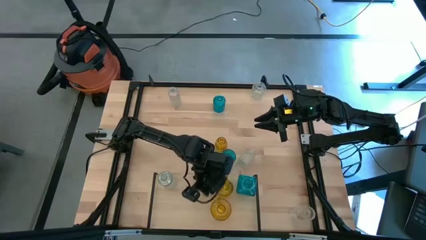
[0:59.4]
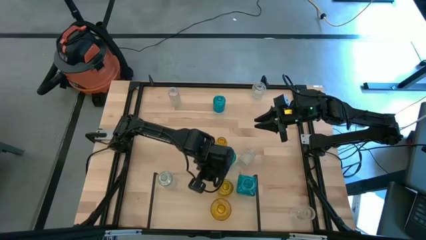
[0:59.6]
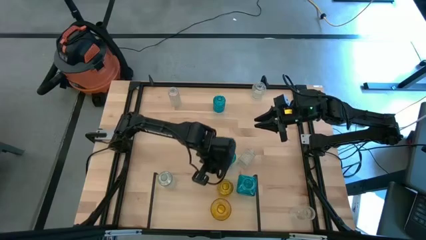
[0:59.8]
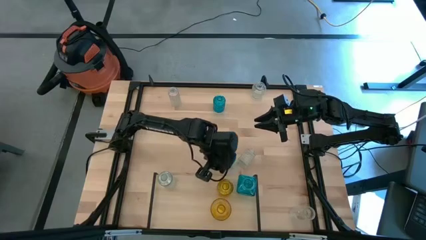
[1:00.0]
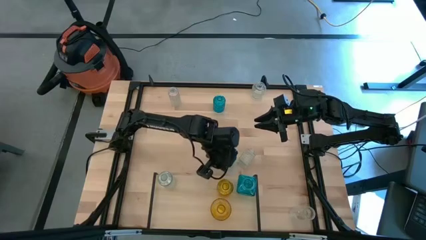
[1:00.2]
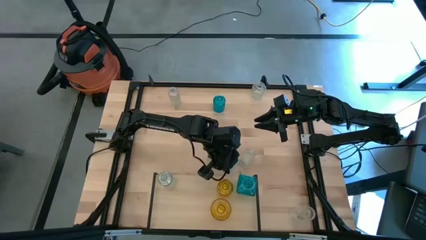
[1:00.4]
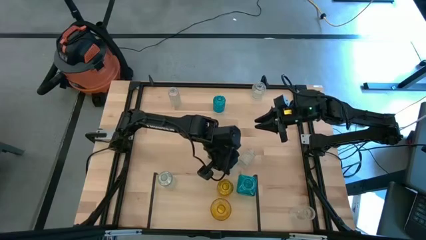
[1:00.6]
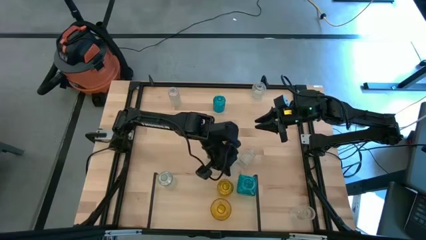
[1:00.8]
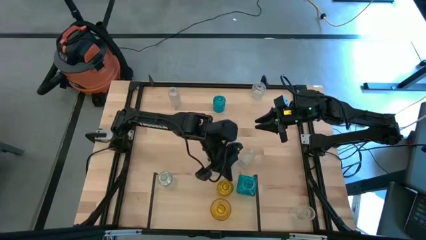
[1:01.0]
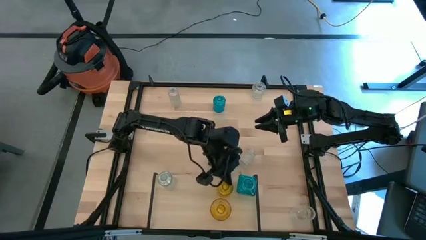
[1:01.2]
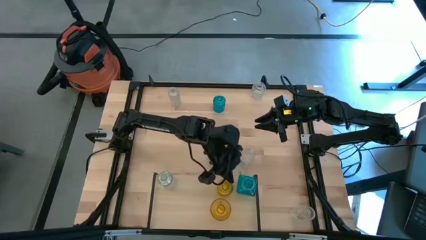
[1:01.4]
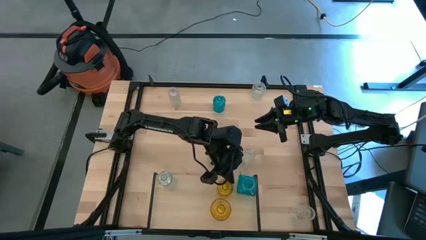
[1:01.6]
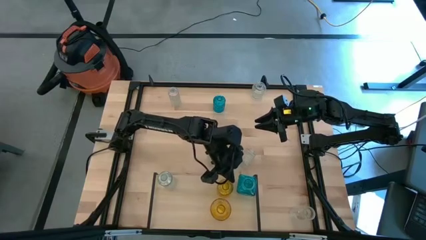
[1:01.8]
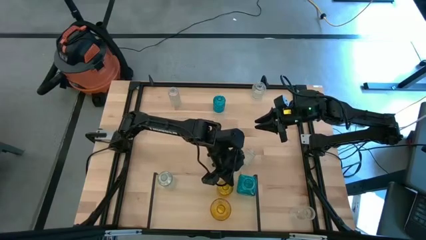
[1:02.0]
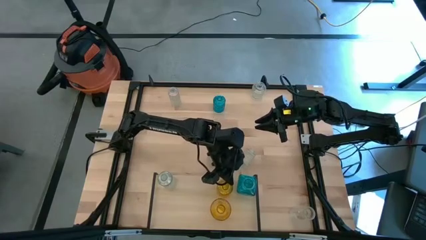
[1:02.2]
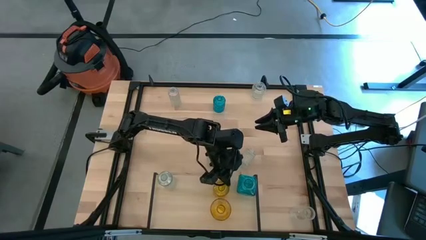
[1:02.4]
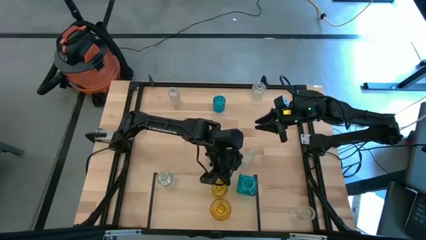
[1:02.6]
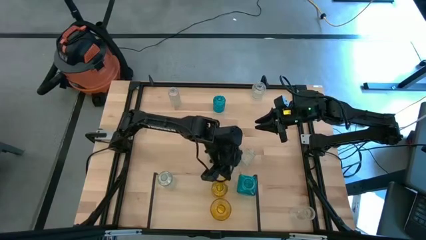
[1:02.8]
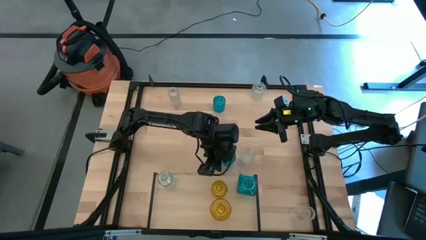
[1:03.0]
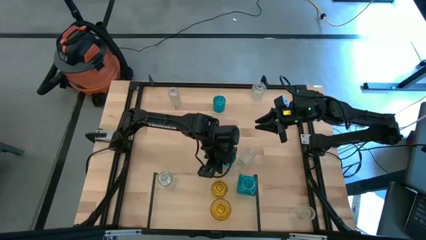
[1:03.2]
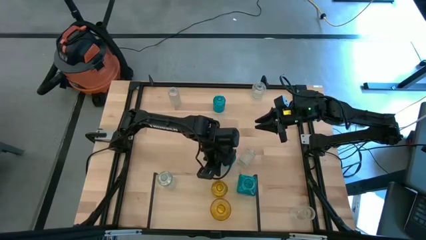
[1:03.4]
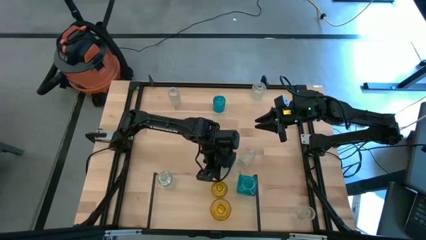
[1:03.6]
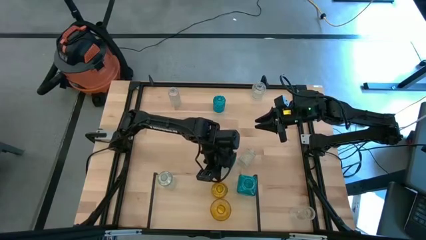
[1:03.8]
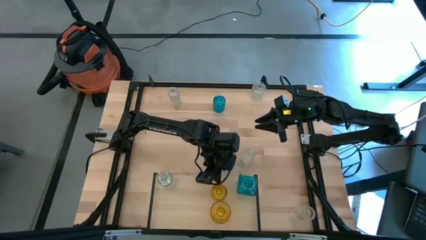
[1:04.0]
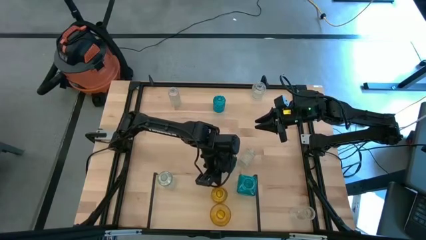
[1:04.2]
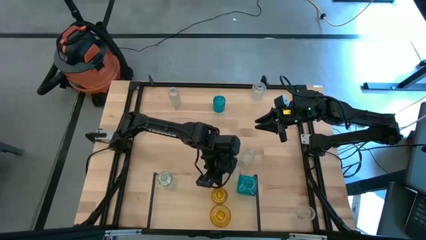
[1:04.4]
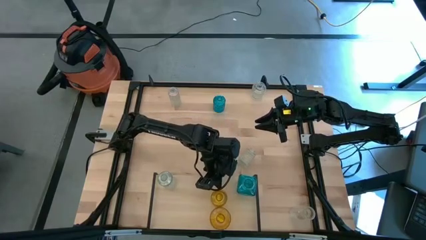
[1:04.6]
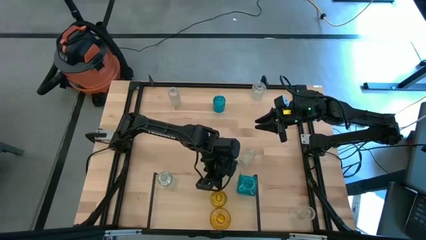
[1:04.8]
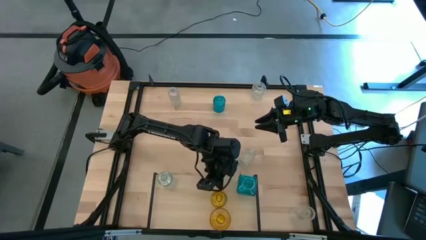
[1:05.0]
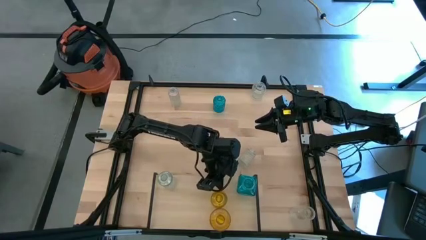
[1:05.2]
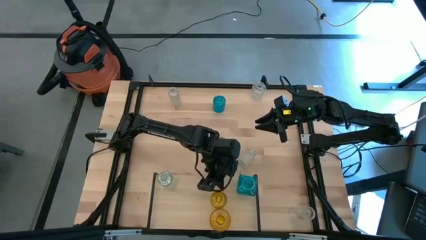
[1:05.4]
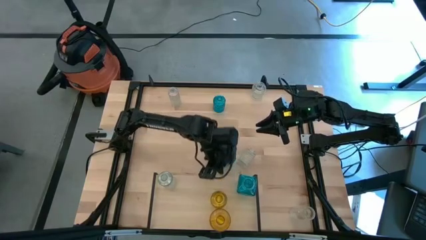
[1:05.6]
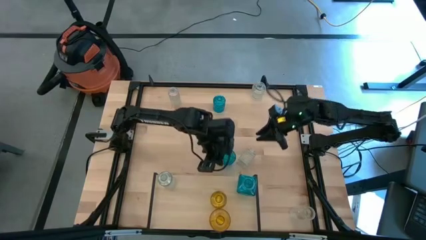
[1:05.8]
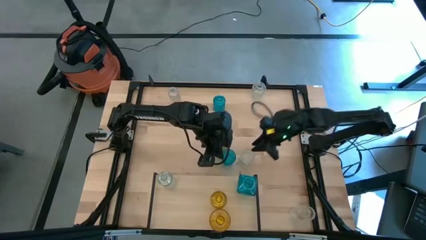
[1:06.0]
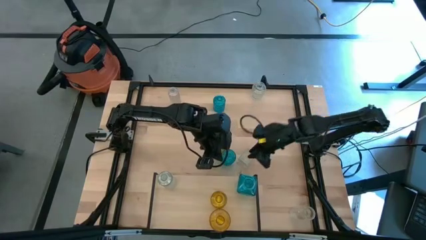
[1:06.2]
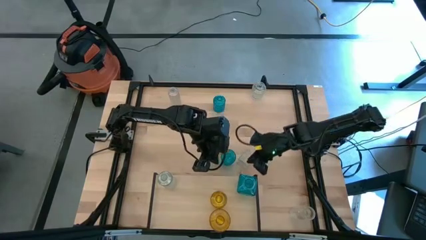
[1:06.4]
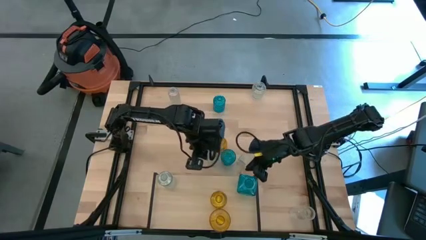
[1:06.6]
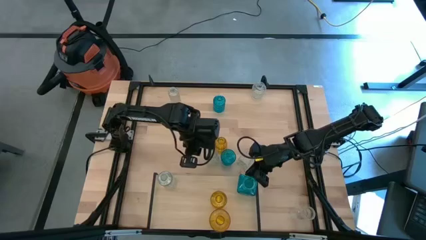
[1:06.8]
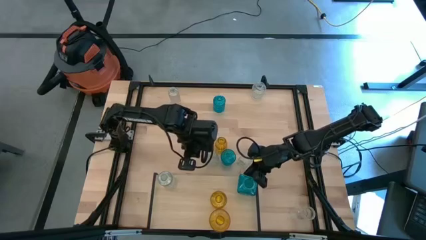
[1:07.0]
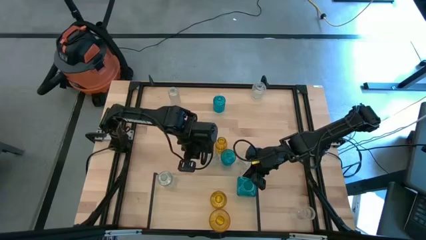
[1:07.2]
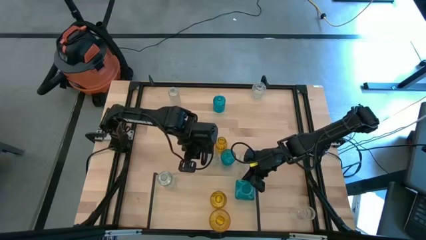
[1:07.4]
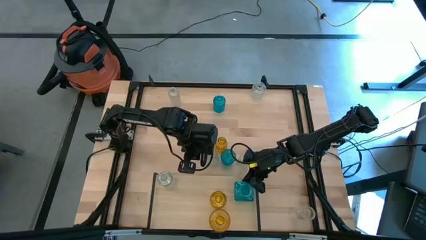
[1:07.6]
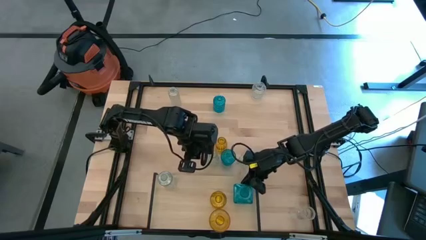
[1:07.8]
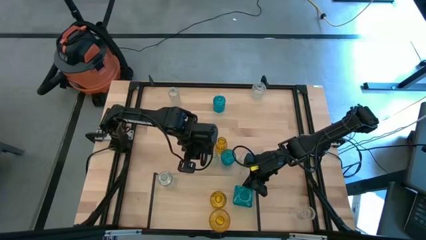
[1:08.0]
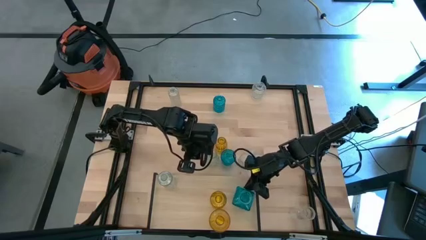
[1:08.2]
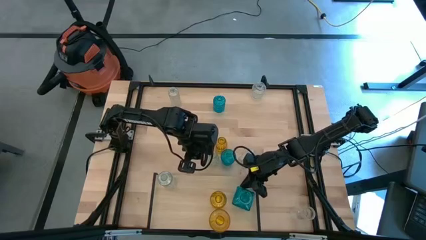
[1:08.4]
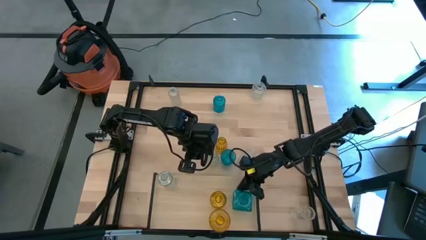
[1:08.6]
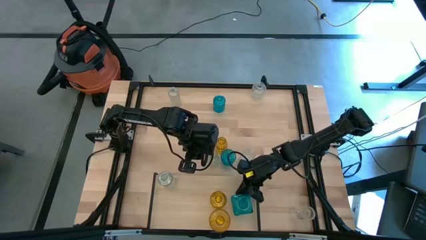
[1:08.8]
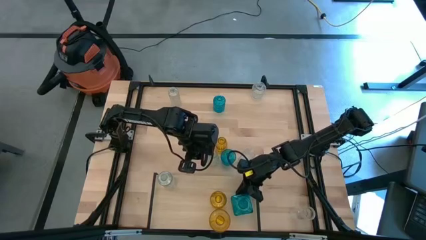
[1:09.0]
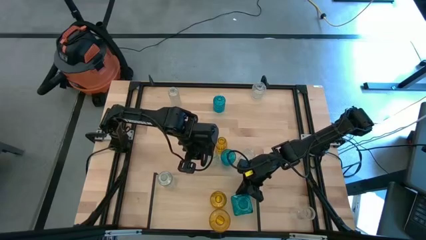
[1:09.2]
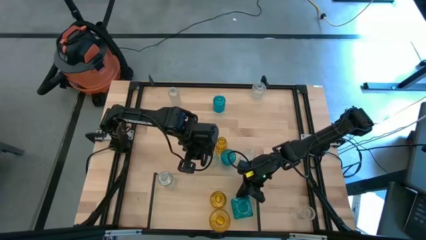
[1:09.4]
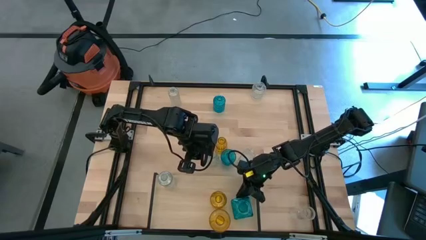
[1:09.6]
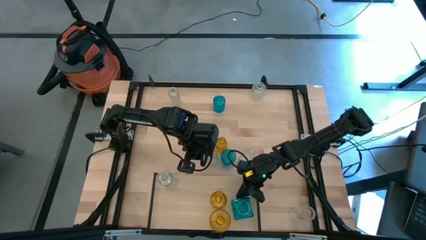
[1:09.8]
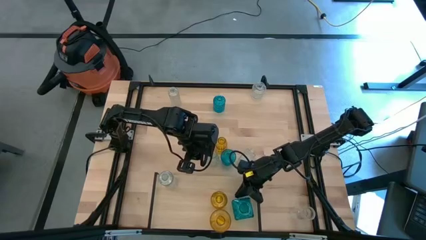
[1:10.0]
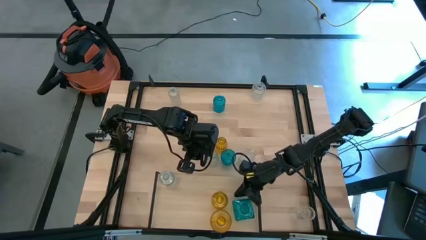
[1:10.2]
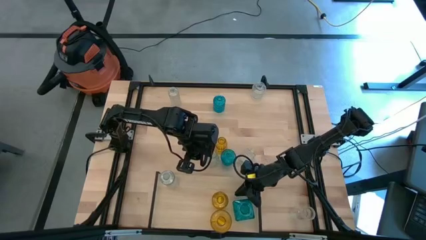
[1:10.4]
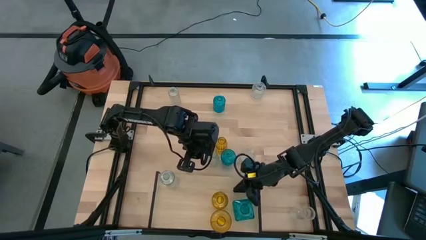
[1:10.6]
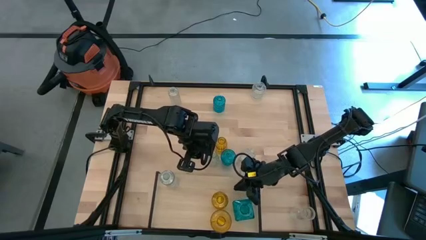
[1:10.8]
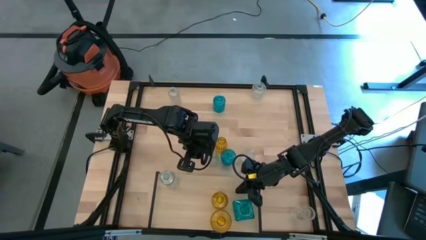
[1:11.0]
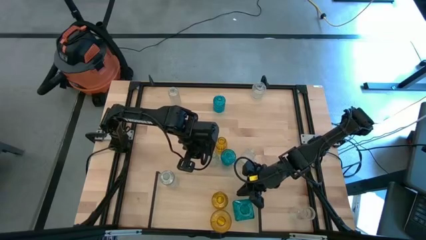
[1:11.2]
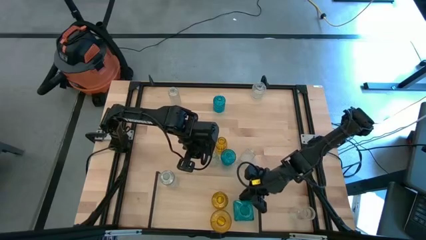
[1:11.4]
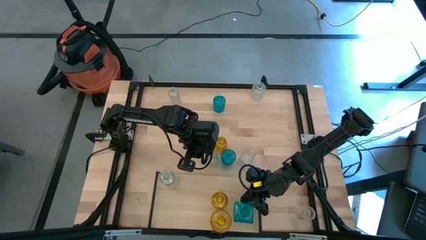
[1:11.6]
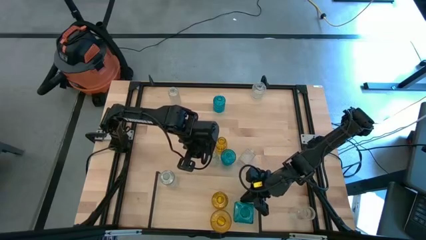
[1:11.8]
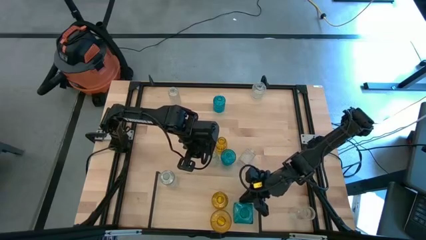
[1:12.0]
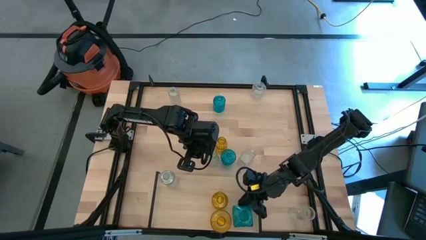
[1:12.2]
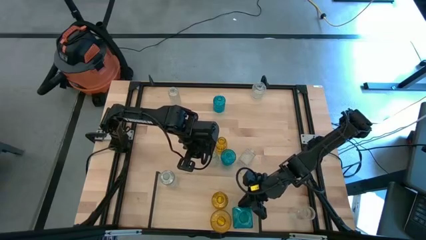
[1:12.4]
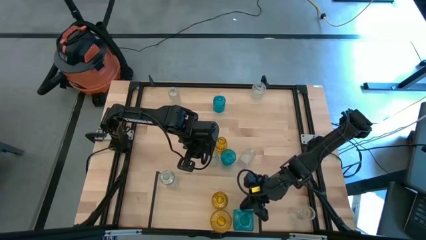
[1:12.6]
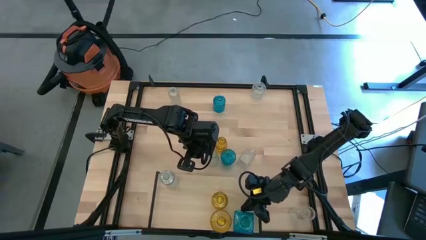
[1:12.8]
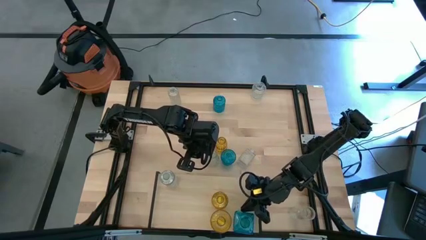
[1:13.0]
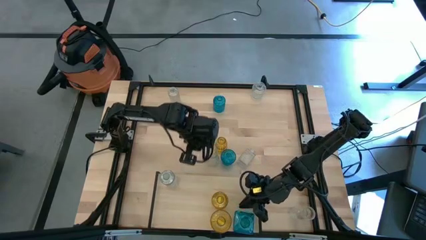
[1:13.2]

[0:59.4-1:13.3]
Task: sort vases onto shelf
Adjust the vases on the shelf

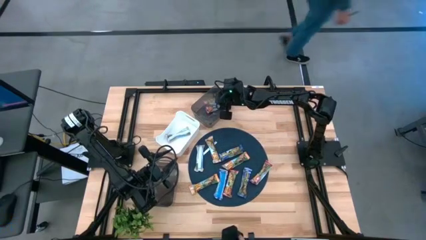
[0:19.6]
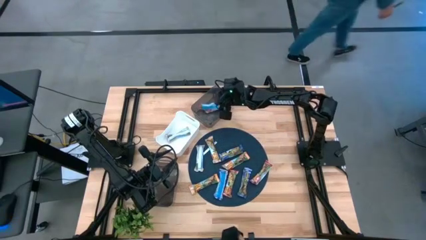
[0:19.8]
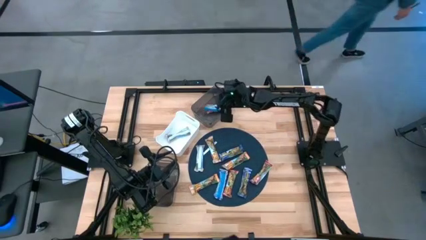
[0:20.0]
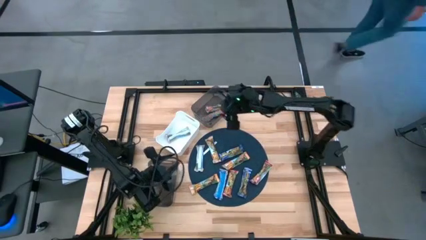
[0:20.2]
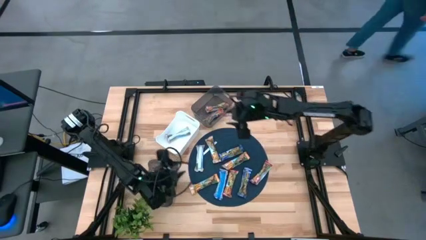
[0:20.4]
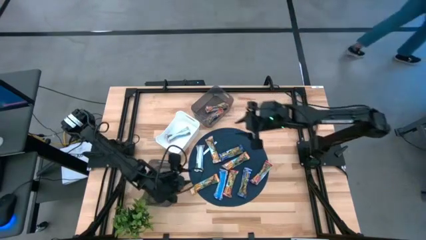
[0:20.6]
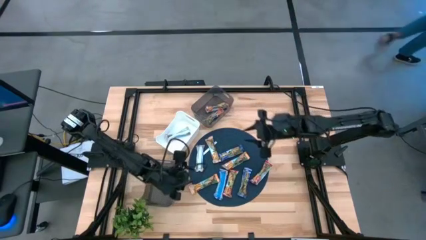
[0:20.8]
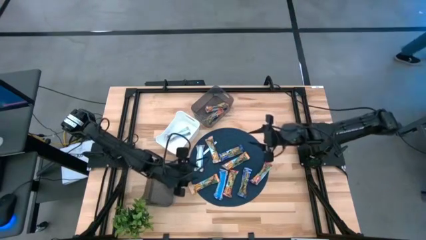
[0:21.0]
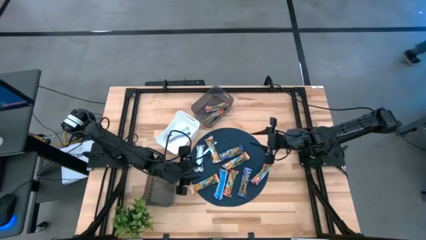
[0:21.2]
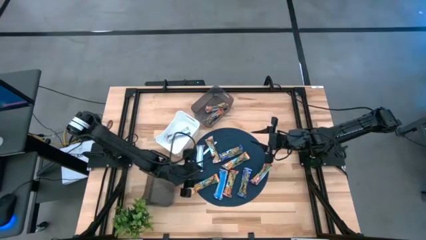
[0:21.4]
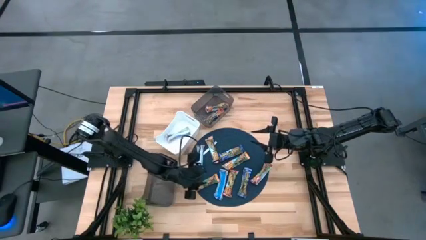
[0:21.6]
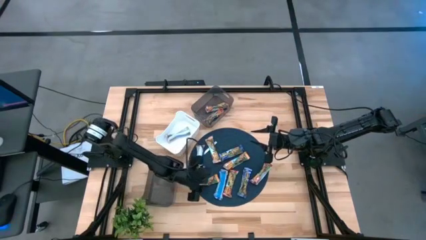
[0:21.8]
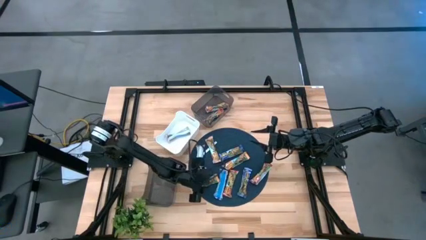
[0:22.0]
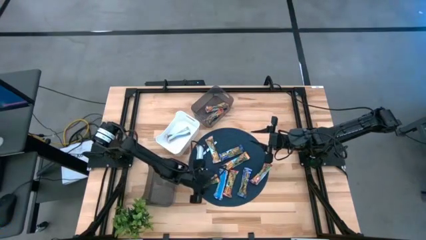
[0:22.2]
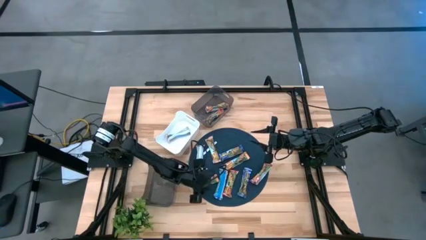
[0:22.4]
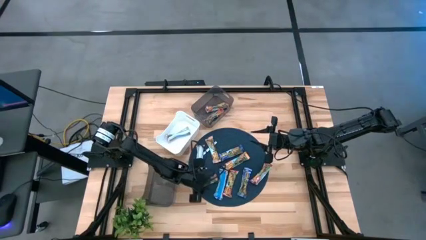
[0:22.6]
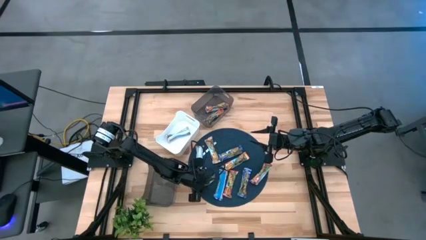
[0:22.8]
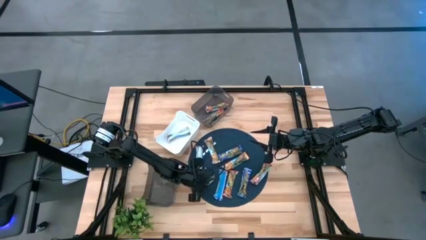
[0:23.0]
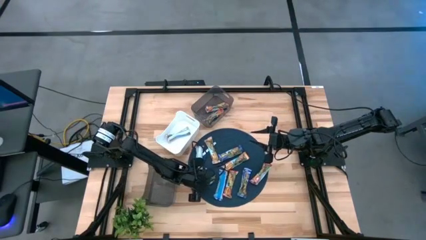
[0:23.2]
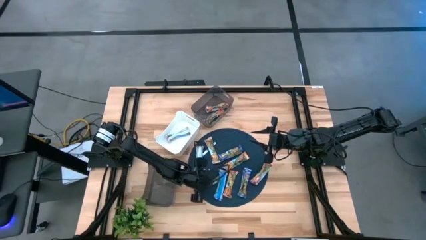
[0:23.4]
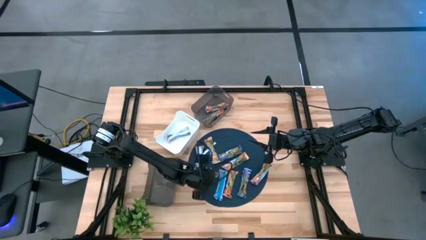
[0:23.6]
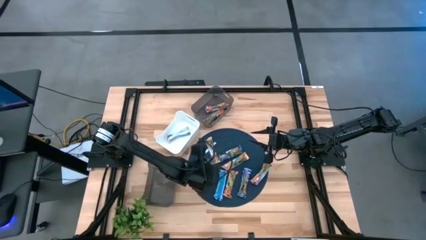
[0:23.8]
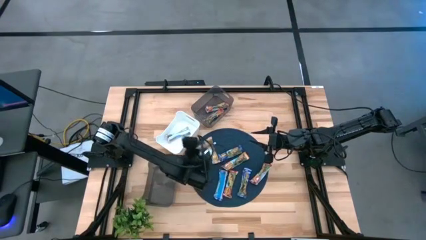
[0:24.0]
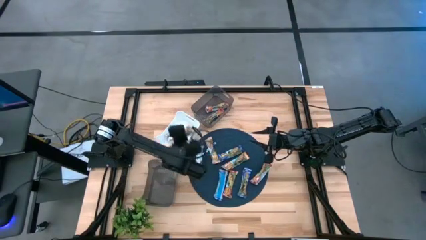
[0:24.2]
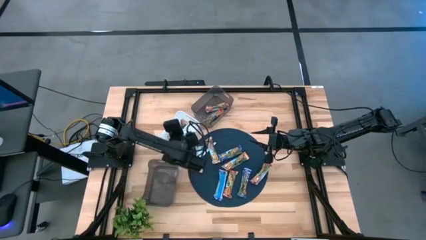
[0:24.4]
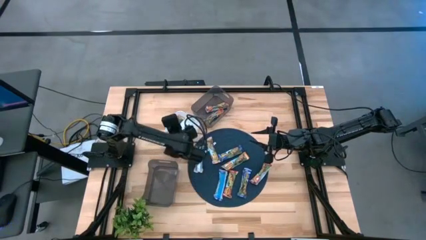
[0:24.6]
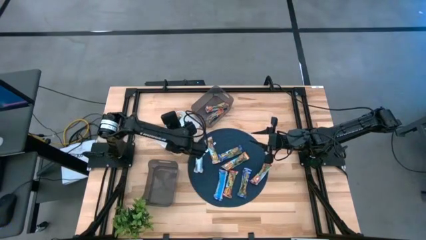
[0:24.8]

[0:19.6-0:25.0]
Task: Pick and place Granola Bars by type
Put the yellow granola bar into the white bin
